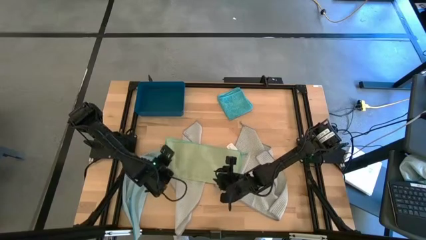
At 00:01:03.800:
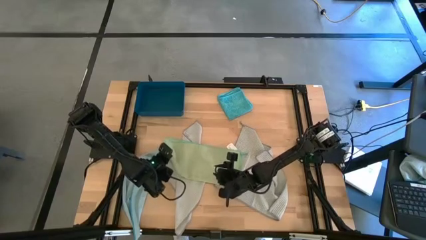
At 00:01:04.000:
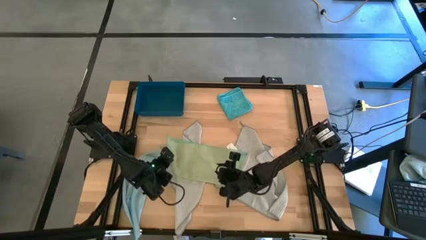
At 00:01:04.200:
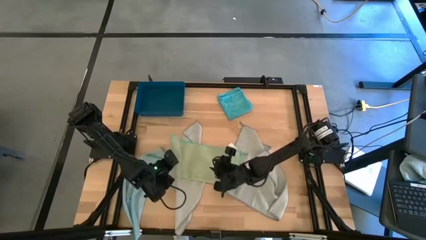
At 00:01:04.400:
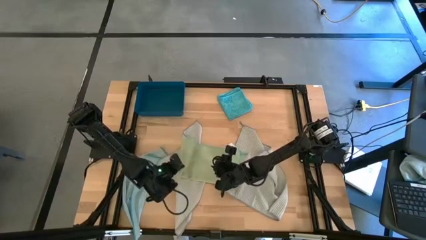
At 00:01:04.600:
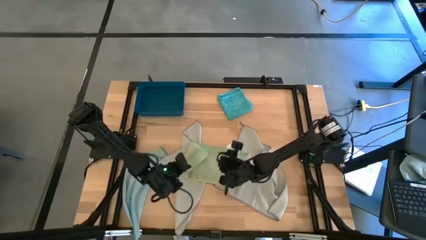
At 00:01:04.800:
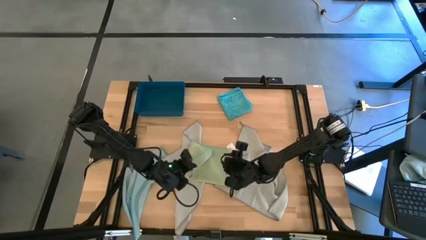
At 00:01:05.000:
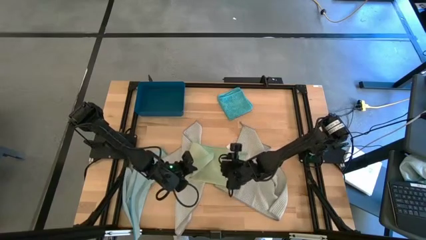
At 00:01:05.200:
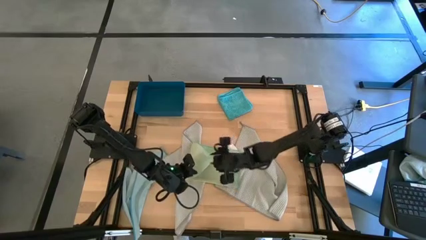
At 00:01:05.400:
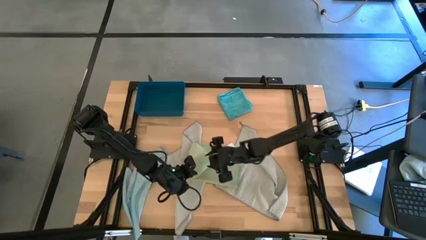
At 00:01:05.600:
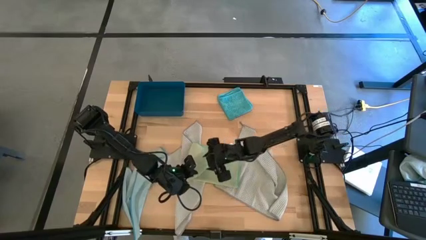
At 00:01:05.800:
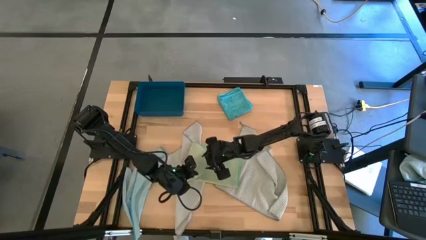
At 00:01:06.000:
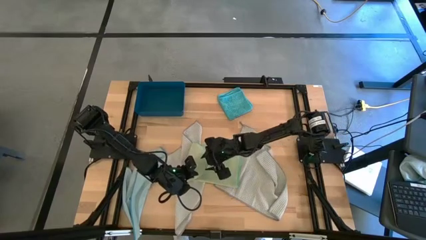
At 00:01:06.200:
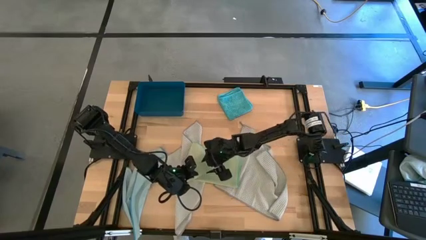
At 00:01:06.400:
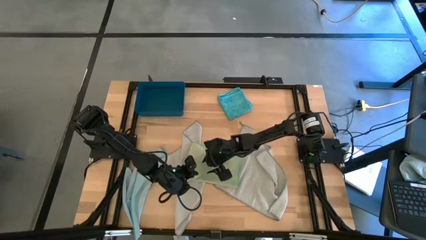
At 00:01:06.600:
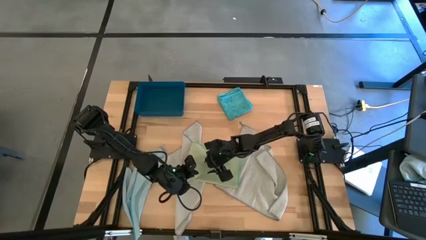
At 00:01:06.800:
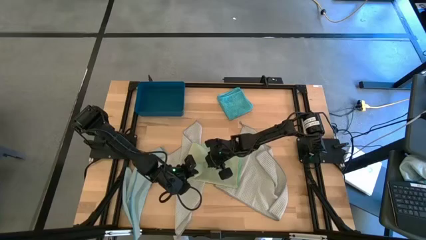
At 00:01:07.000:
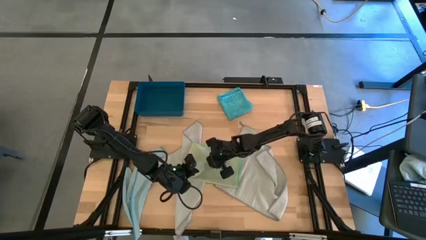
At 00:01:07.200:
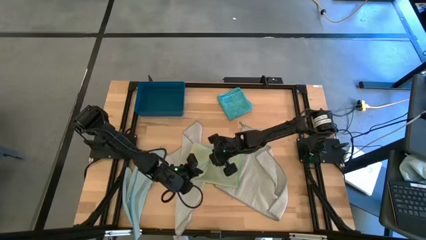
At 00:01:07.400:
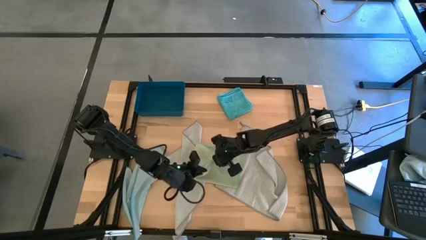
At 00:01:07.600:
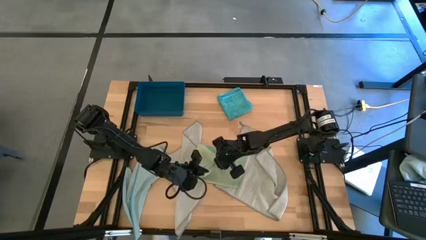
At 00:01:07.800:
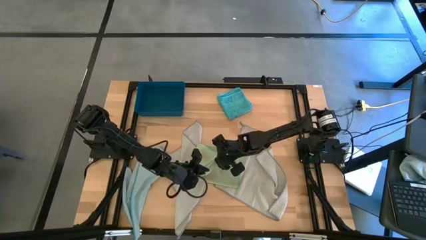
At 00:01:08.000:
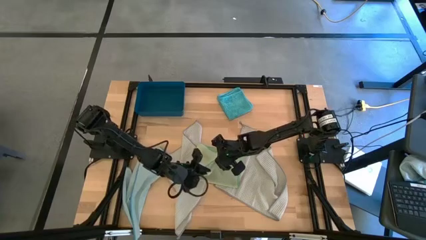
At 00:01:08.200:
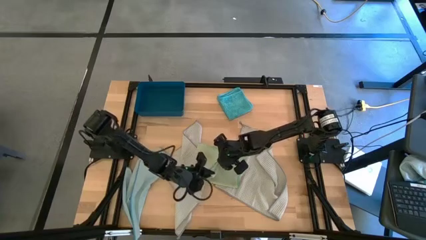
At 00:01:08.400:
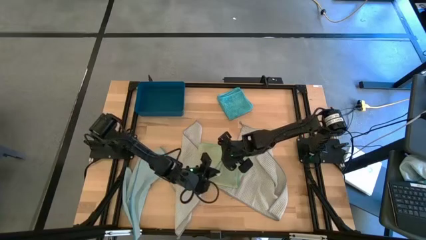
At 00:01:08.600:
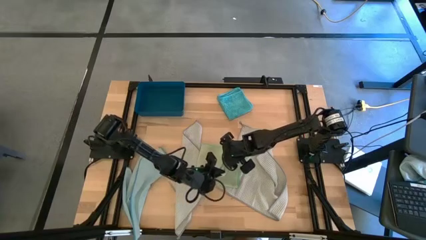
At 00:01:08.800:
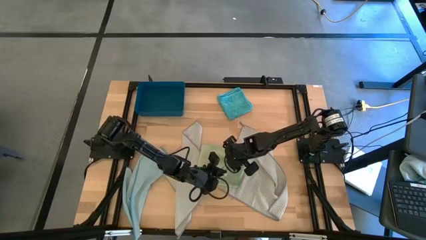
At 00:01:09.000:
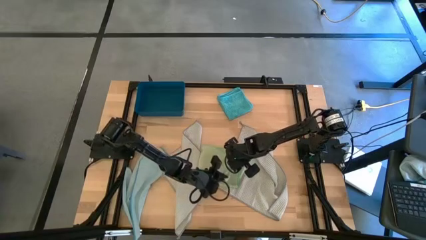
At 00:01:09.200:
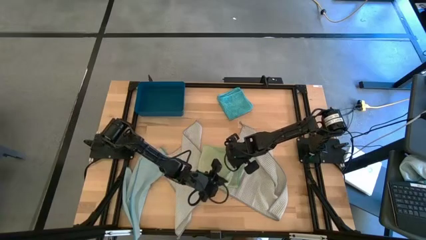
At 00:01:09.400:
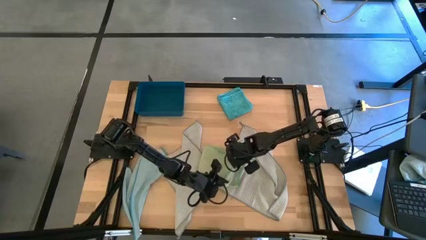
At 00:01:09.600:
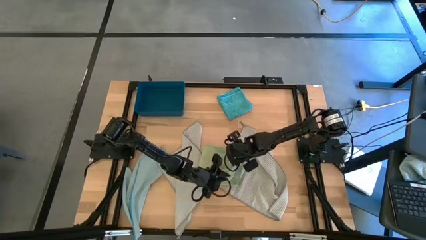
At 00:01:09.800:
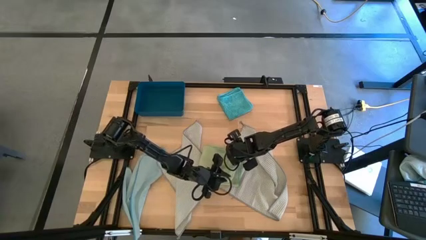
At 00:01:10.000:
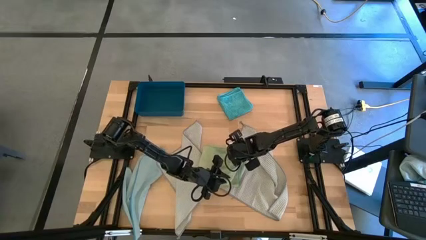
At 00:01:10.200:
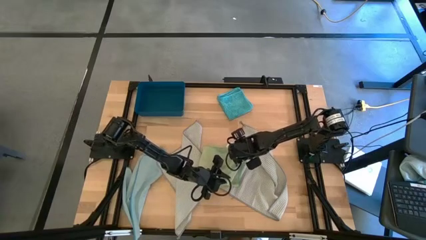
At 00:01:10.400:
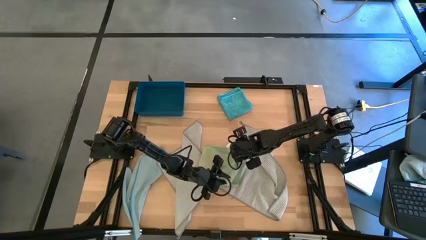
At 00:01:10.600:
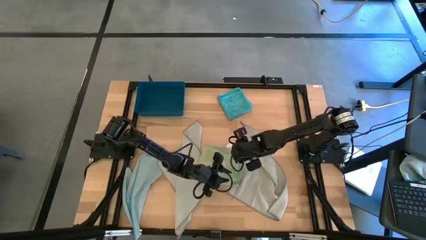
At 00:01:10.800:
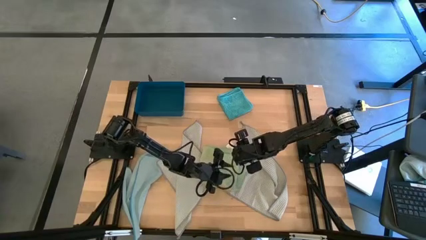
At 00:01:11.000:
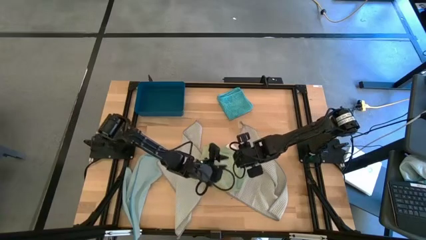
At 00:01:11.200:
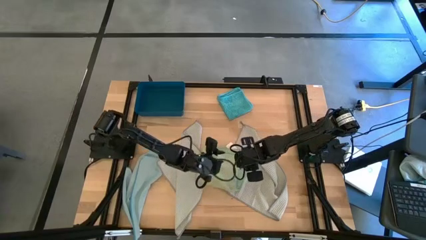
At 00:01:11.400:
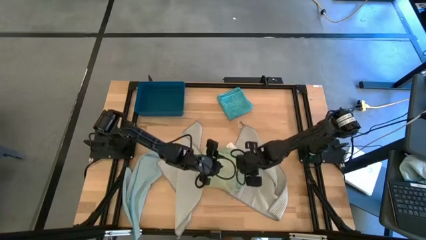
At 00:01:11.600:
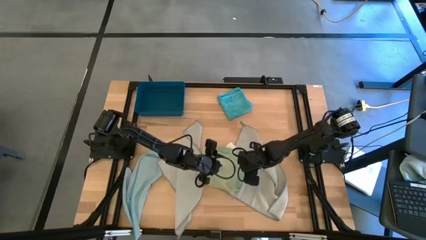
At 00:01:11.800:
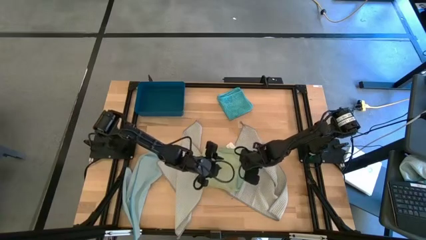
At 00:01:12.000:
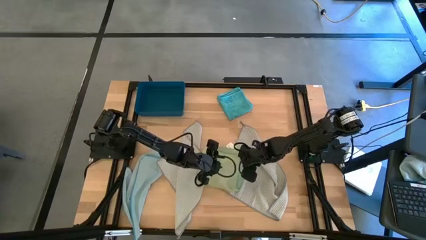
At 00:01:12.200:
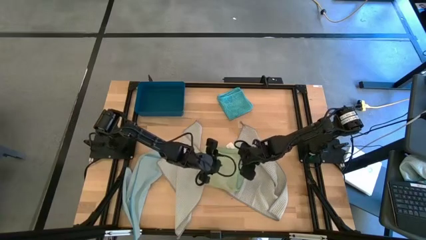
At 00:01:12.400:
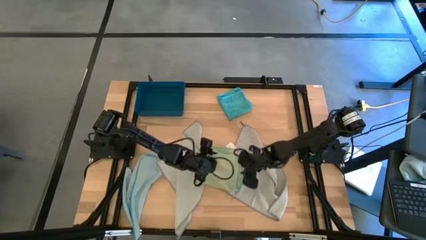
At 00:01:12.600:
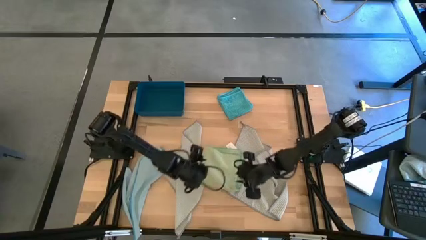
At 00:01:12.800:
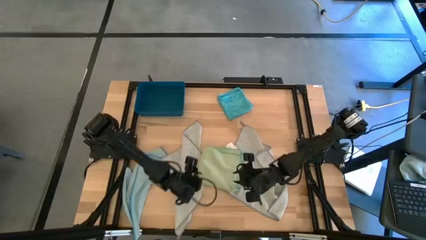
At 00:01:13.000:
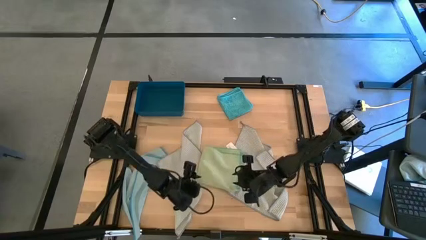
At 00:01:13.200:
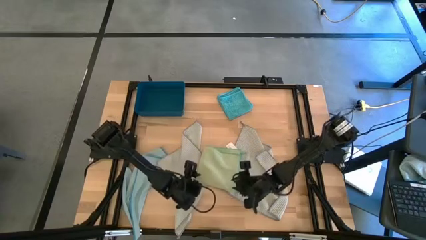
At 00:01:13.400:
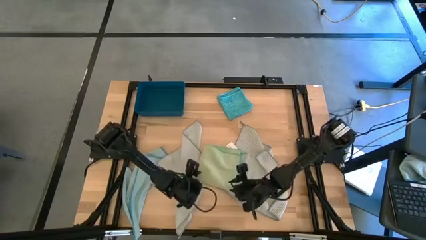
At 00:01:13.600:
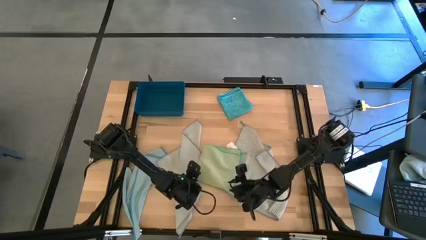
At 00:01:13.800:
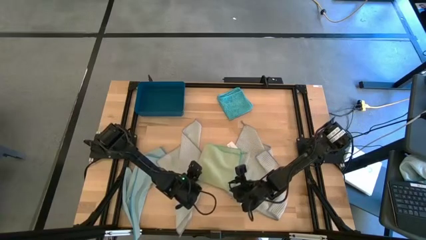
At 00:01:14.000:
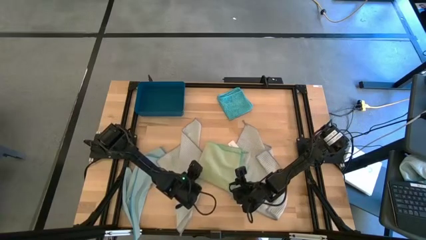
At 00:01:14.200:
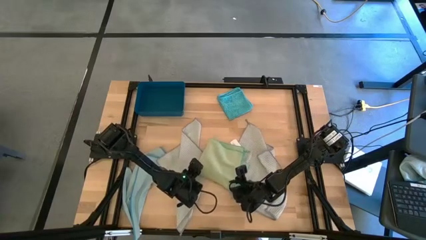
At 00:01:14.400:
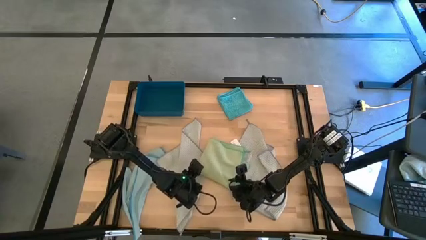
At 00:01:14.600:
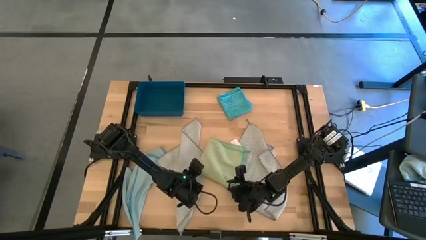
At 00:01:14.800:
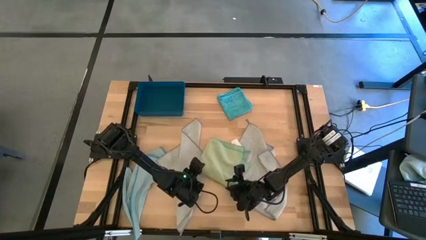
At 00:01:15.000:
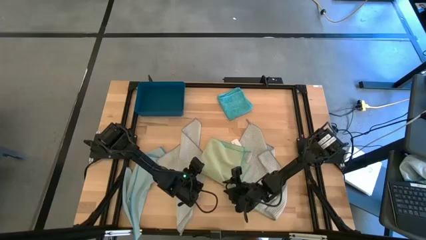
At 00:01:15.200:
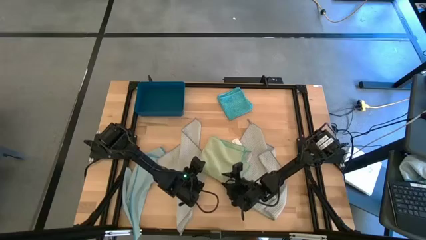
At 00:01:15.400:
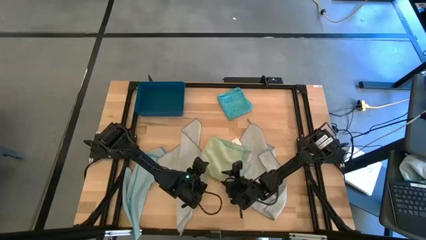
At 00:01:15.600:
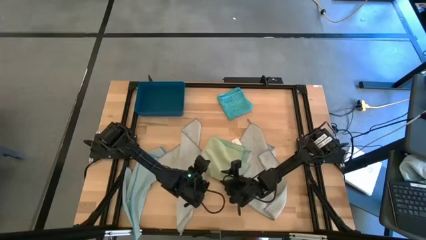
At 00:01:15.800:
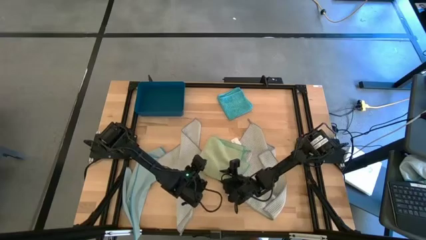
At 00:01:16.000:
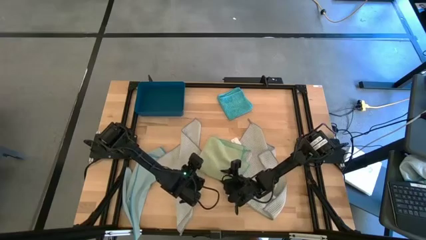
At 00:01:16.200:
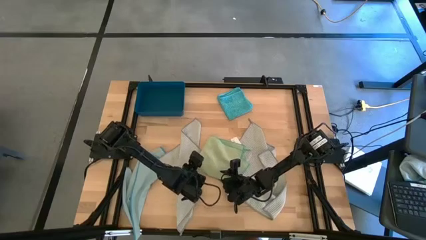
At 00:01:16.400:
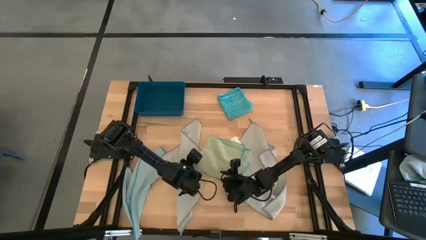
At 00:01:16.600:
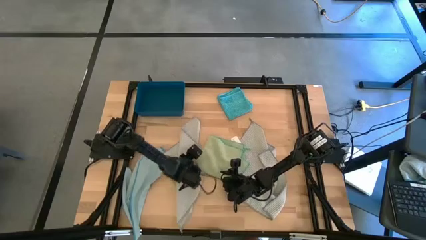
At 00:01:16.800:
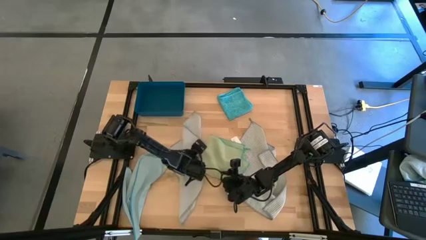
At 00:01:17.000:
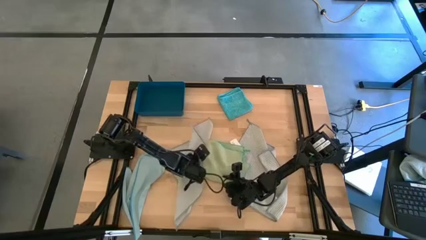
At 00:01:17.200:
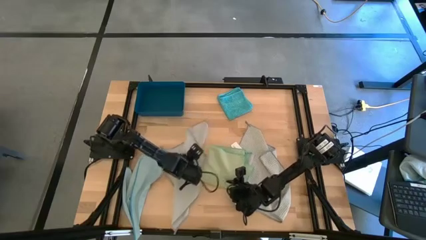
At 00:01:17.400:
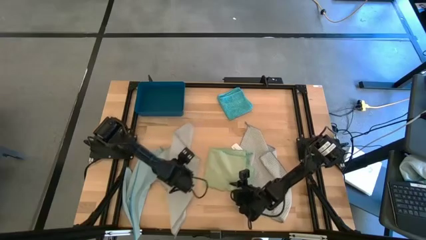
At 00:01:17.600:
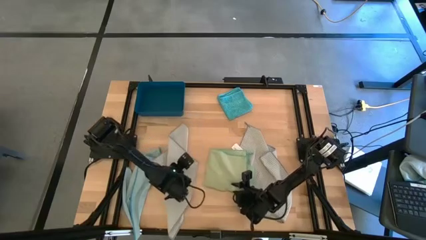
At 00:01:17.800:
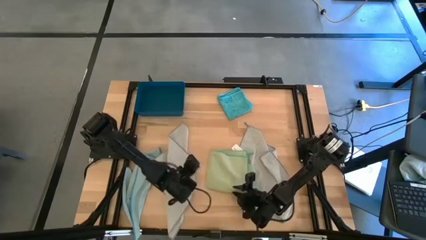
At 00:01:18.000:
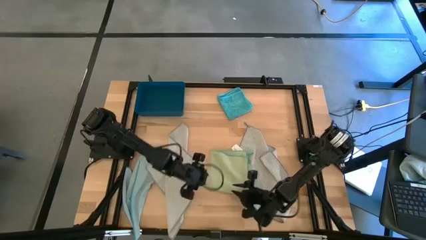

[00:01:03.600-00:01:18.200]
Task: Fold microfiber towels
Fold the green towel
